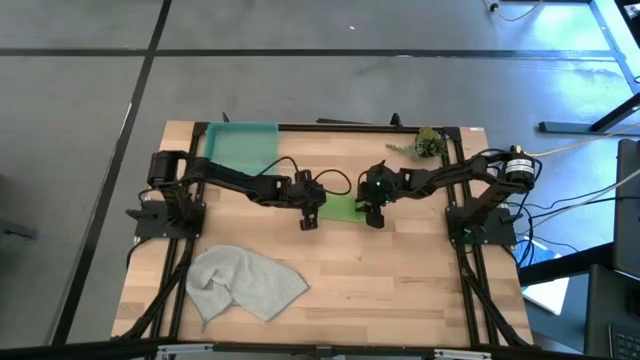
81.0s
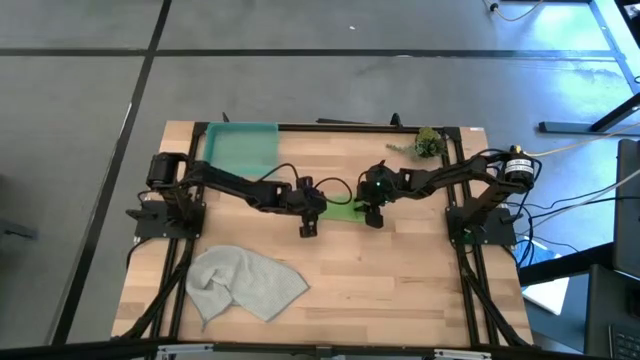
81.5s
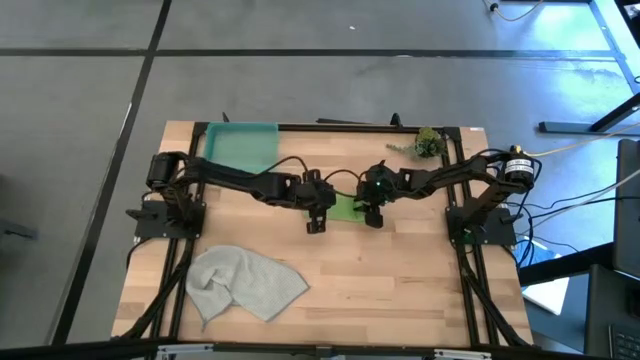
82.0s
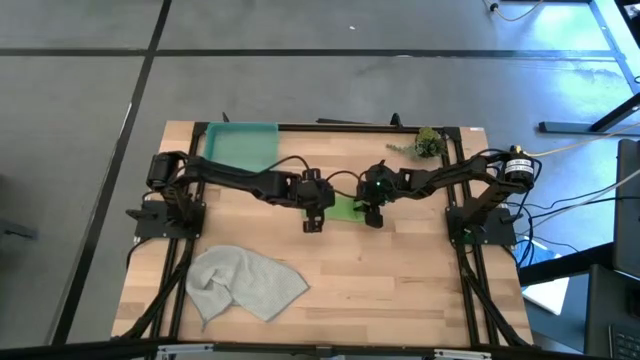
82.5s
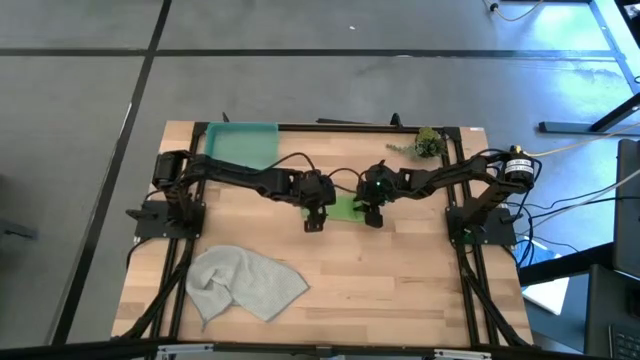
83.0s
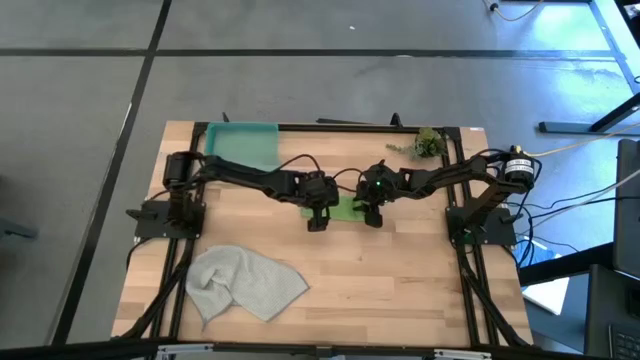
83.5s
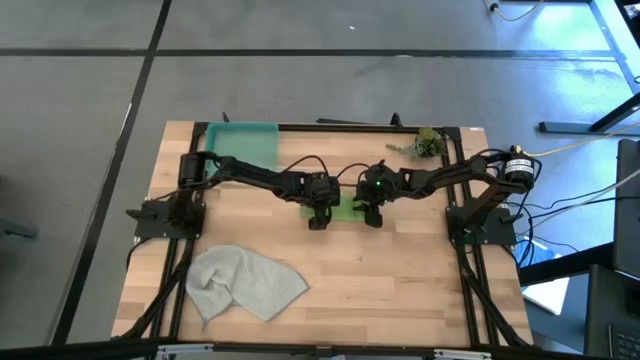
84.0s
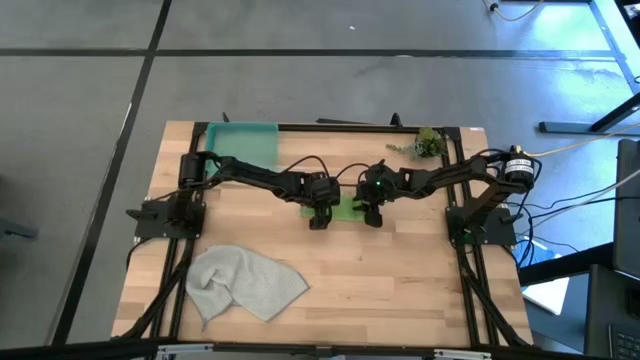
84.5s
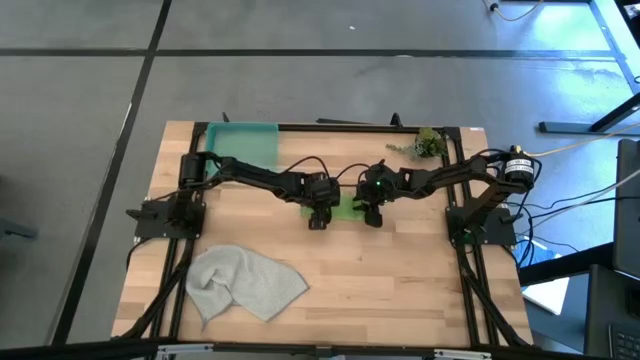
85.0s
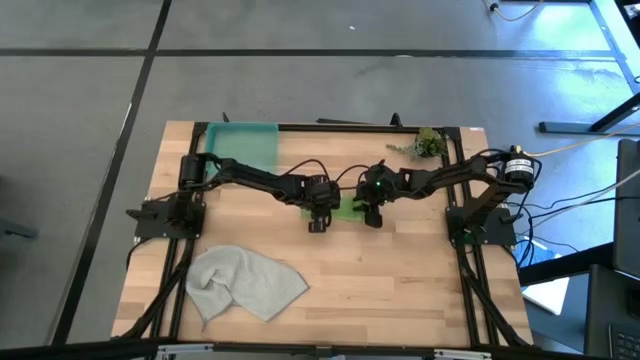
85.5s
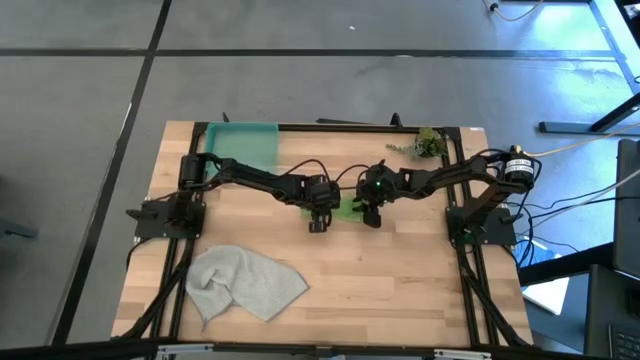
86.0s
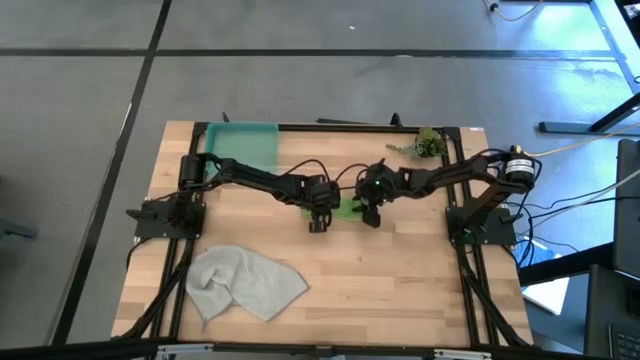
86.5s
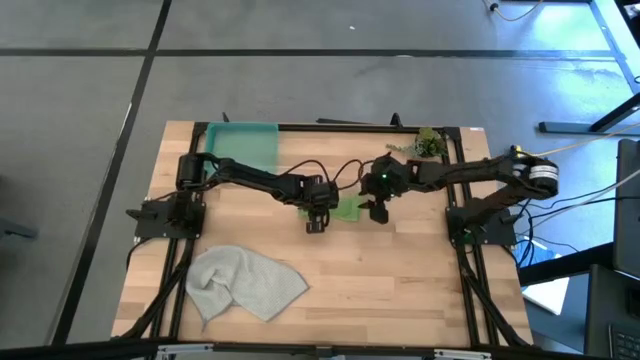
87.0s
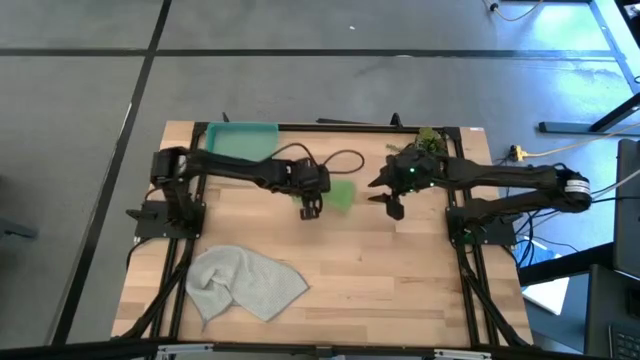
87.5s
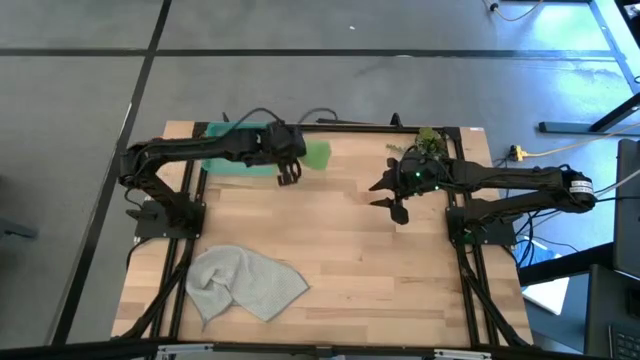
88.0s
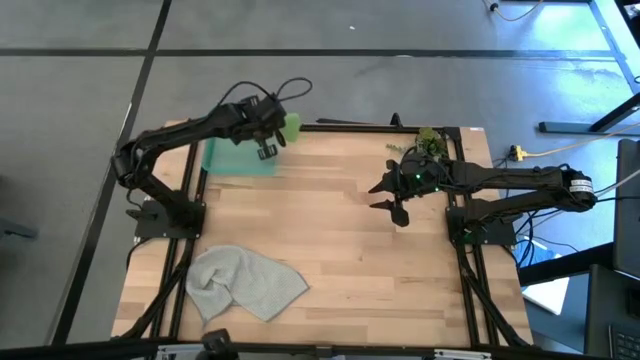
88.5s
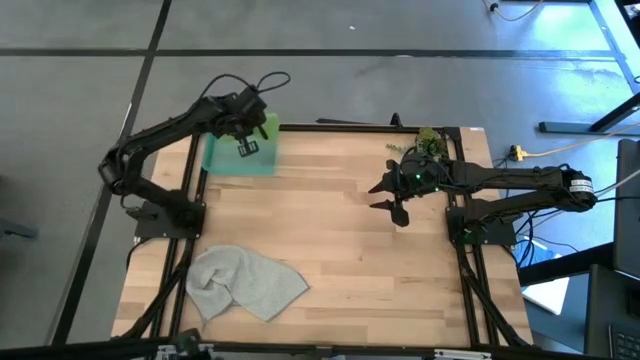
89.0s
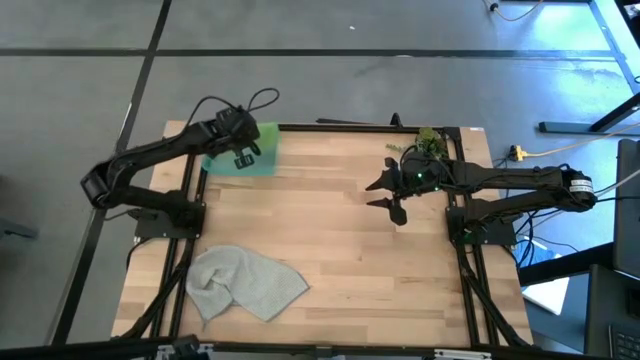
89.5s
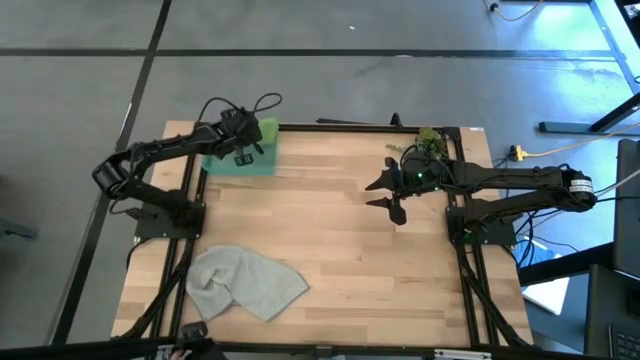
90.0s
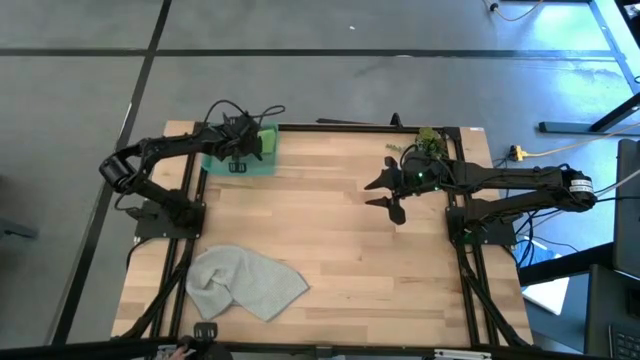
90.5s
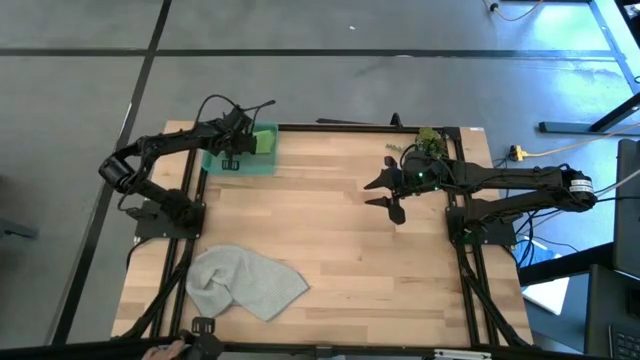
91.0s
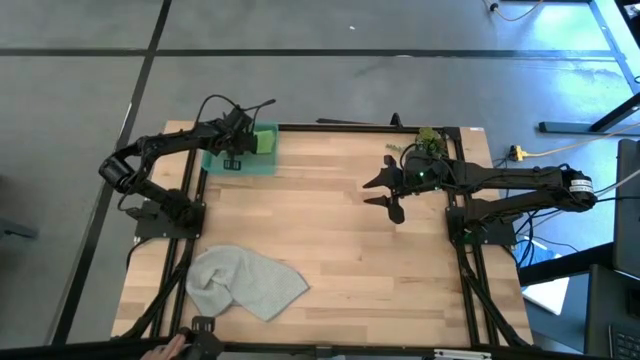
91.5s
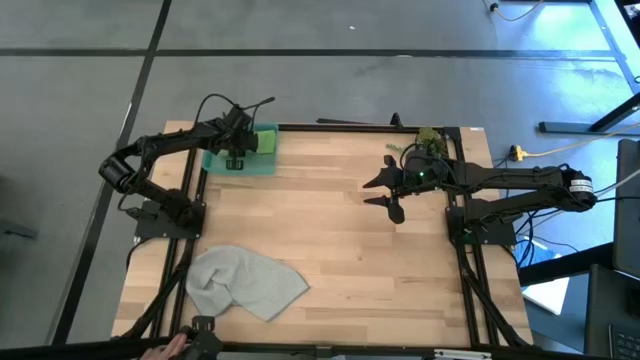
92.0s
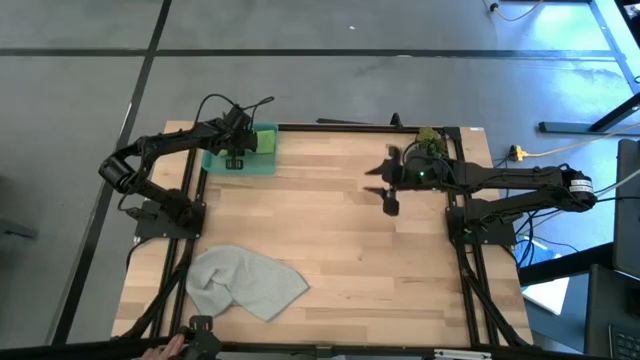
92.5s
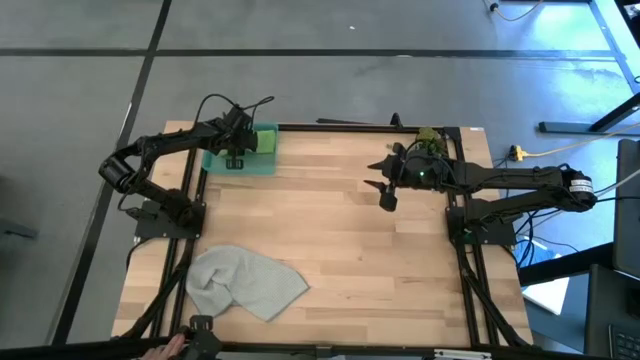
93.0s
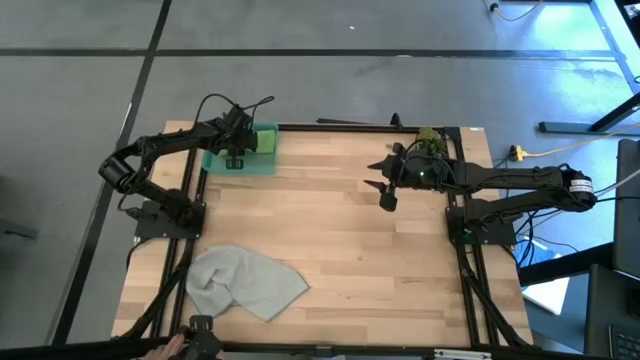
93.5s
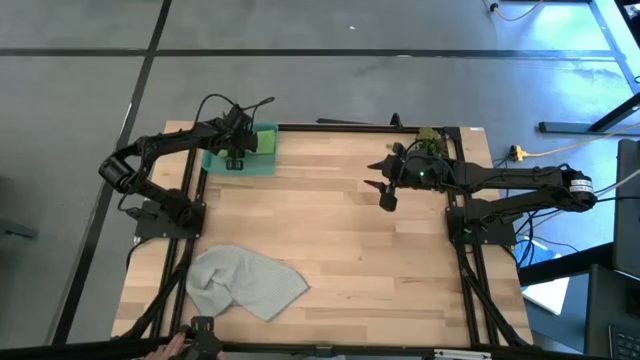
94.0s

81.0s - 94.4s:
Task: Roll microfiber towels into tight, uniform cylinder then place into a basket
Put the rolled green towel into the light blue bin

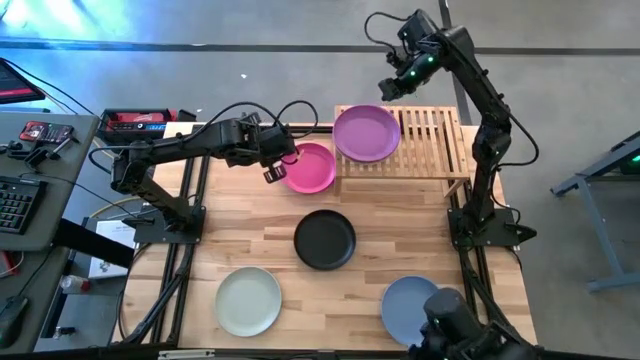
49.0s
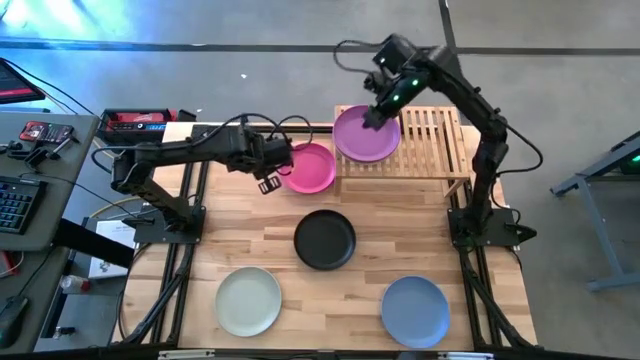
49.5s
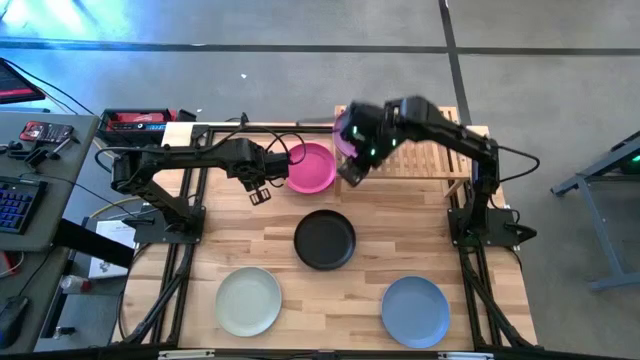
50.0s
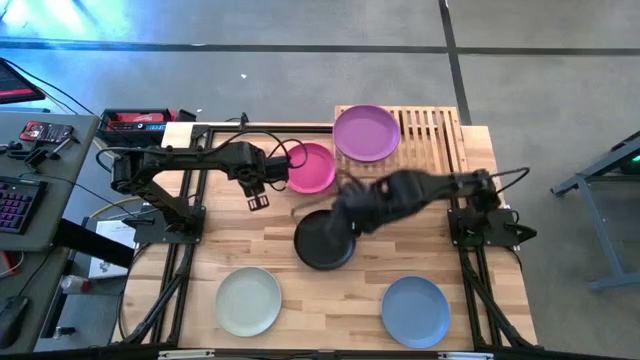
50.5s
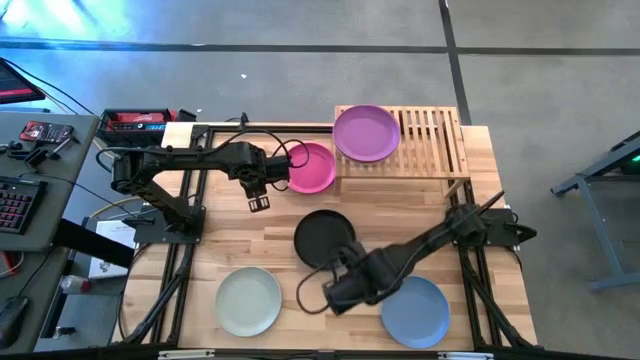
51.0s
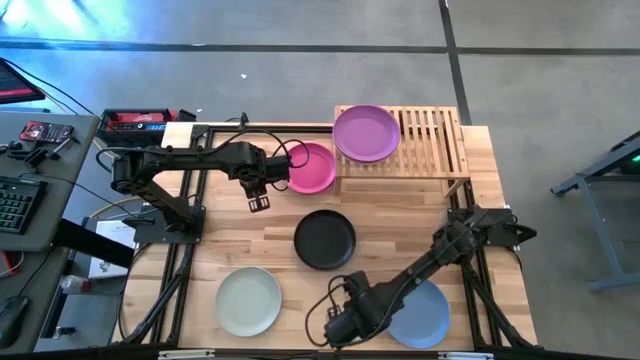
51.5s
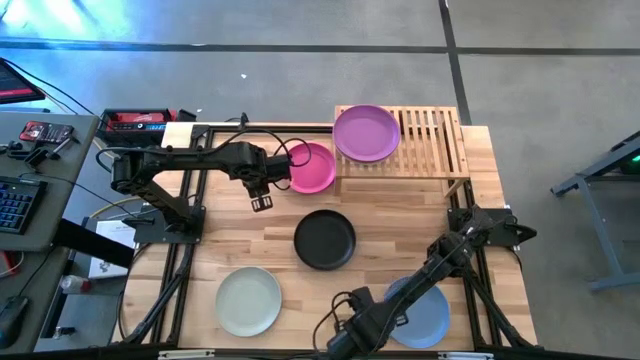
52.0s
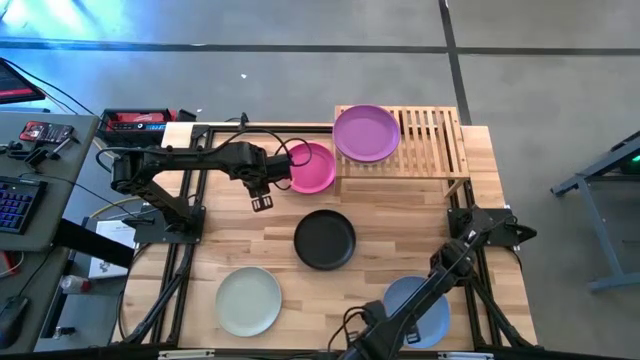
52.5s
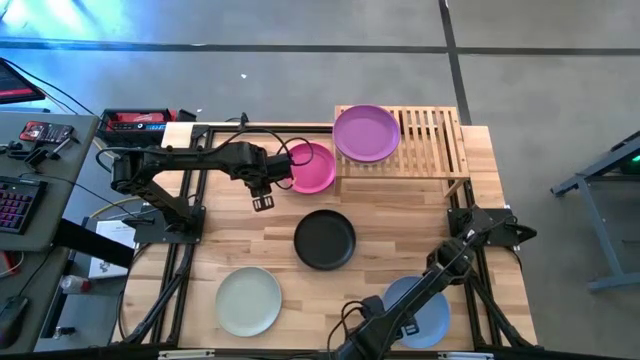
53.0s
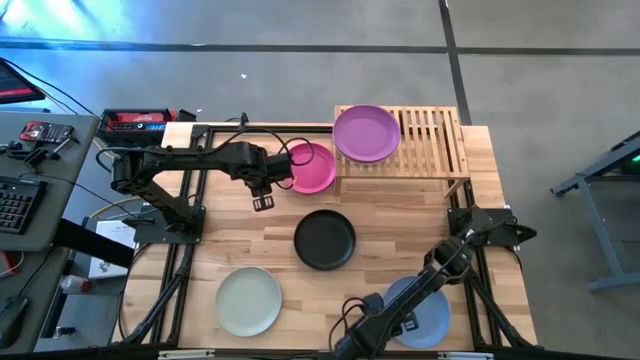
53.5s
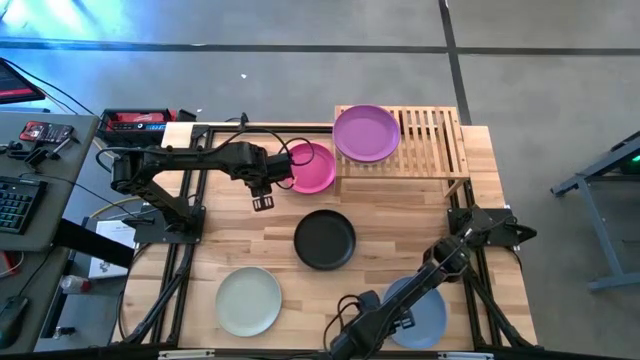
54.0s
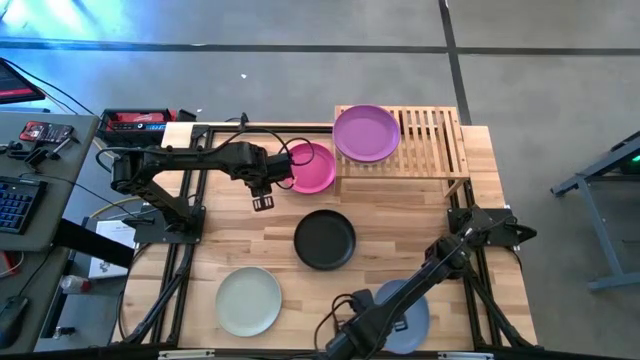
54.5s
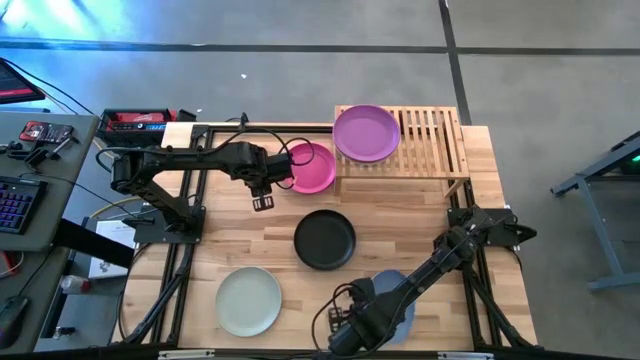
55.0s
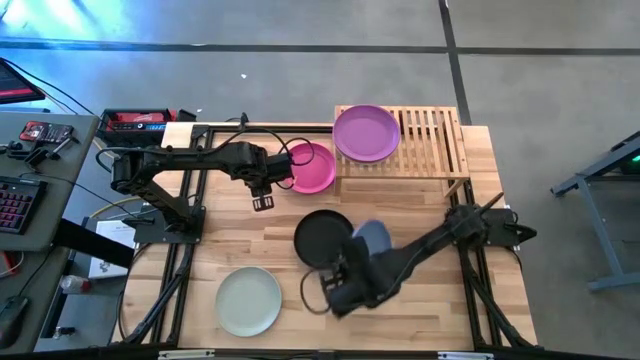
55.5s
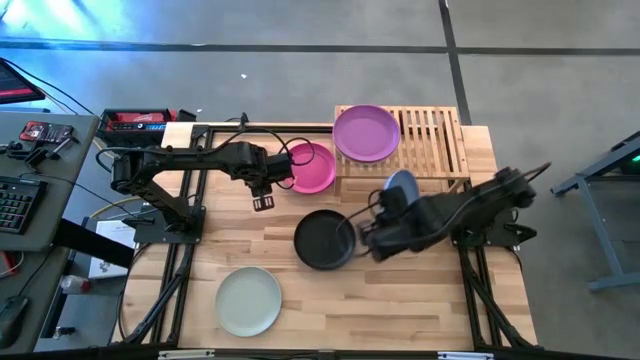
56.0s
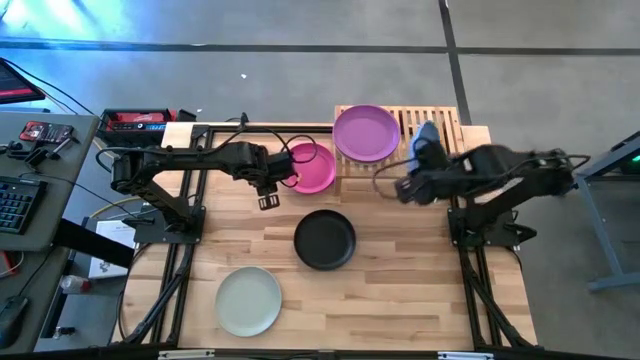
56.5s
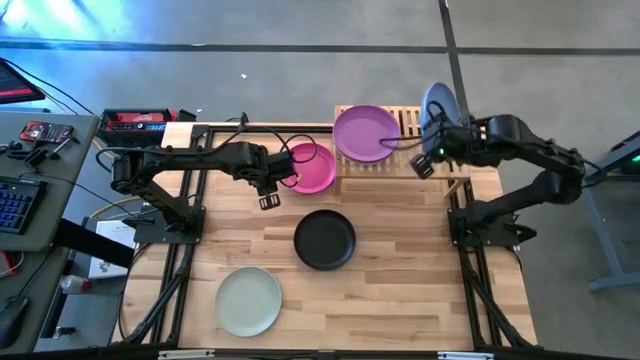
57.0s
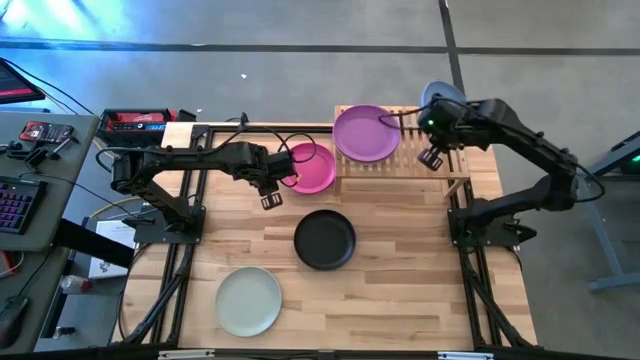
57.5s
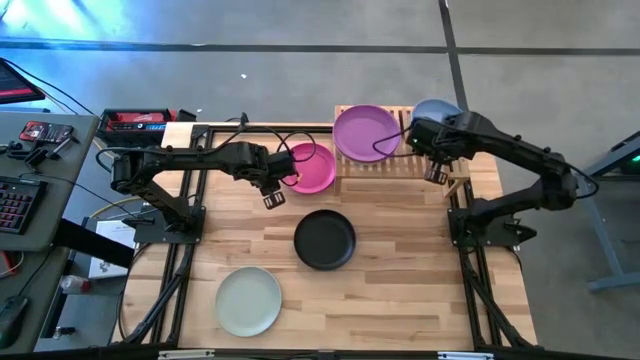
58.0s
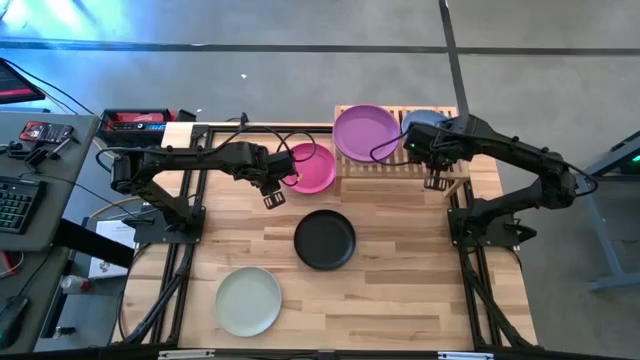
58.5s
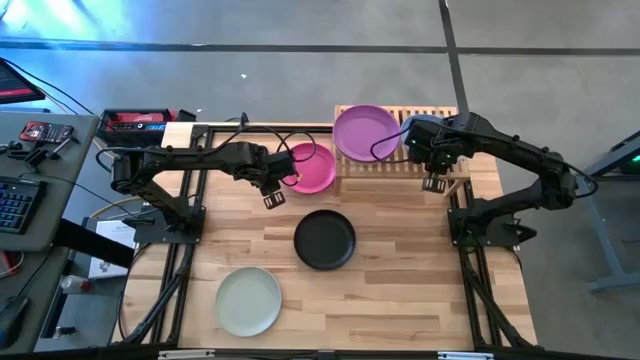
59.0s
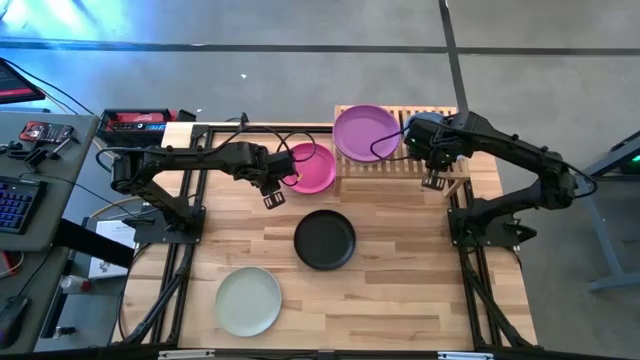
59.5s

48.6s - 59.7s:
Task: Place and stack plates onto a shelf
Put the bottom right blue plate on the shelf
